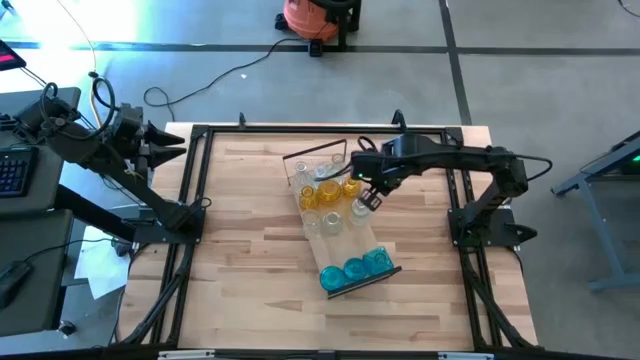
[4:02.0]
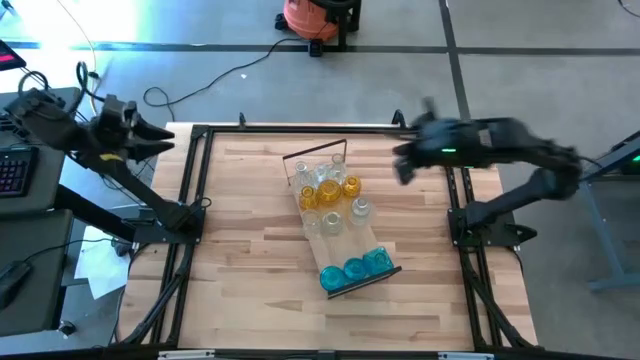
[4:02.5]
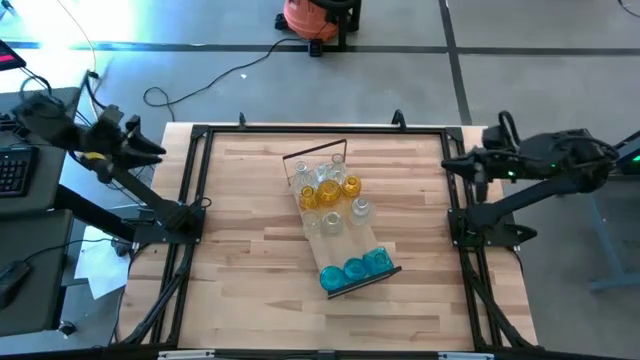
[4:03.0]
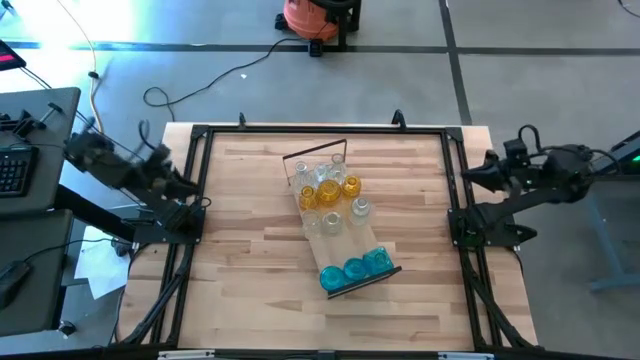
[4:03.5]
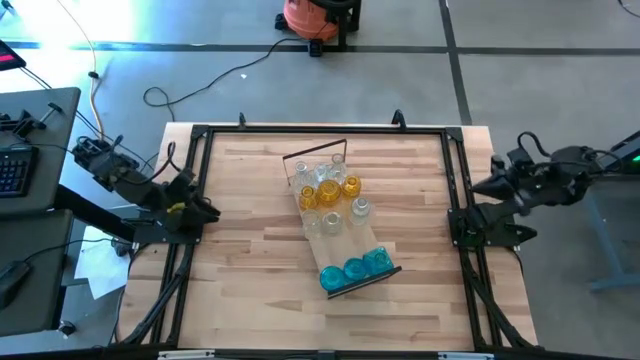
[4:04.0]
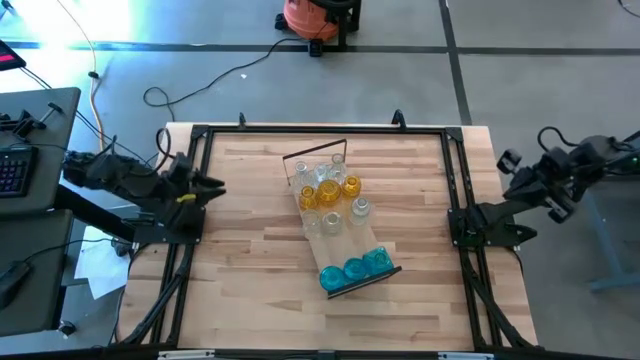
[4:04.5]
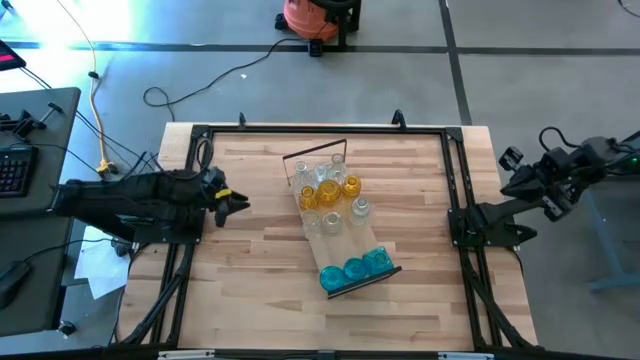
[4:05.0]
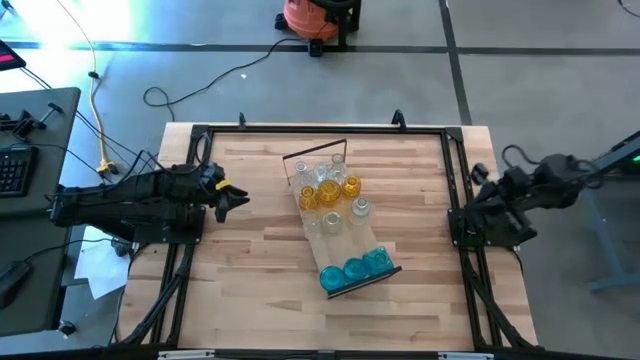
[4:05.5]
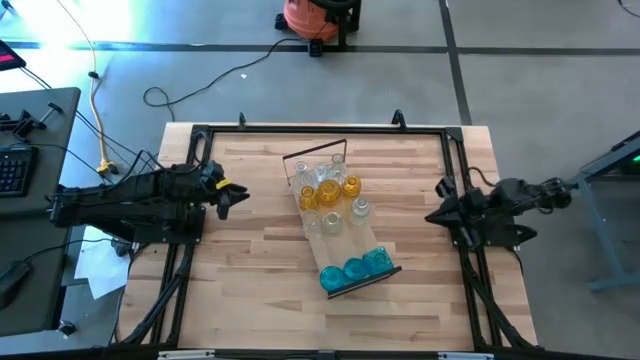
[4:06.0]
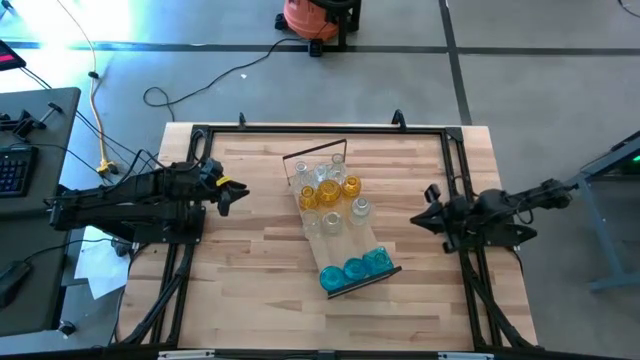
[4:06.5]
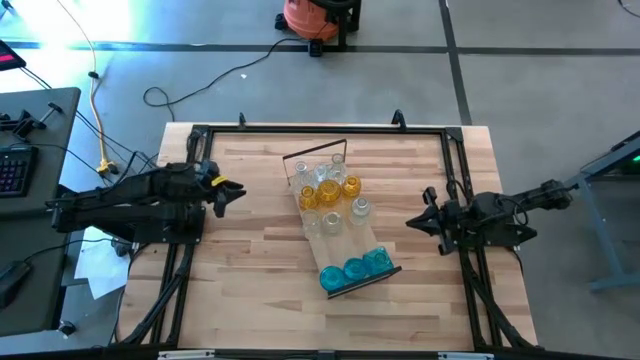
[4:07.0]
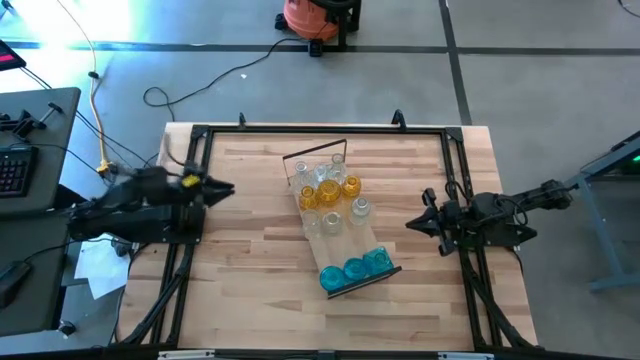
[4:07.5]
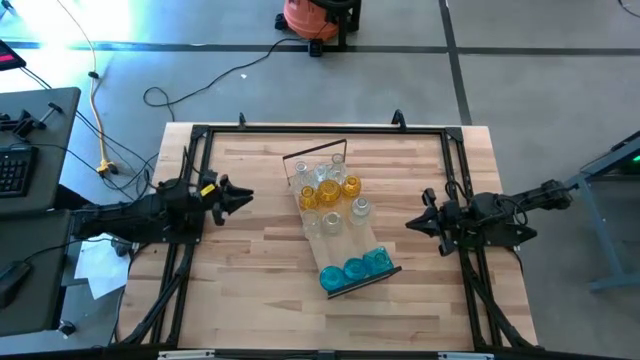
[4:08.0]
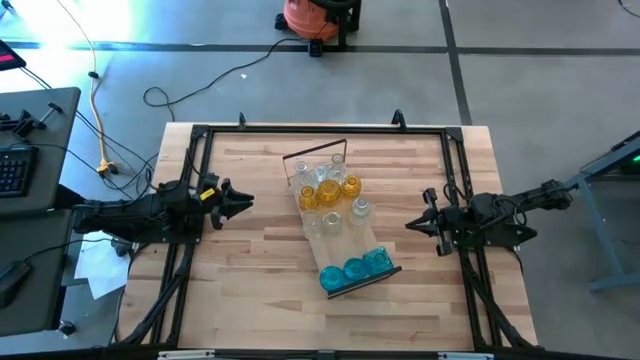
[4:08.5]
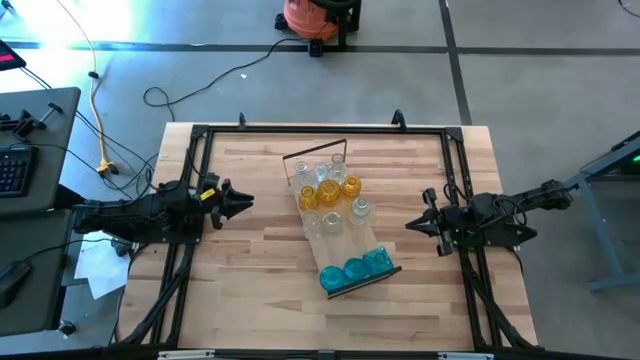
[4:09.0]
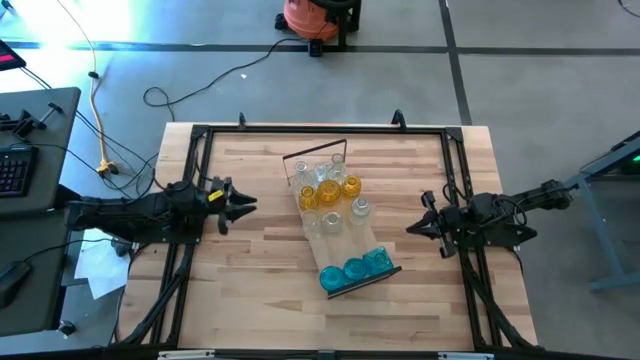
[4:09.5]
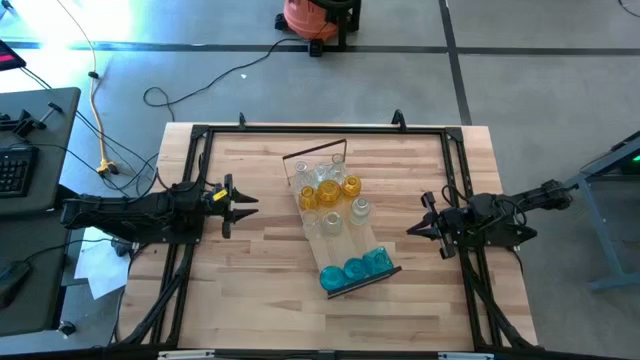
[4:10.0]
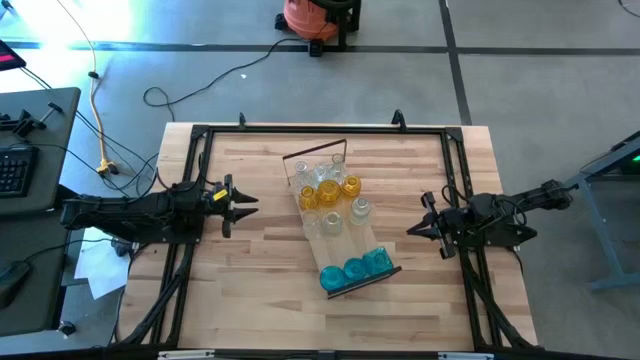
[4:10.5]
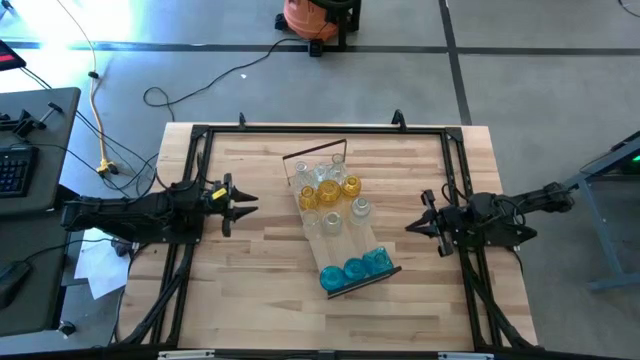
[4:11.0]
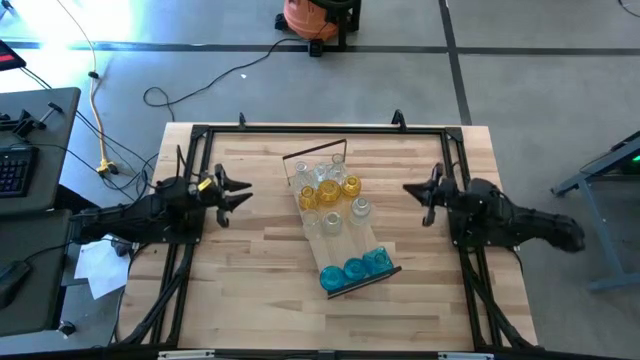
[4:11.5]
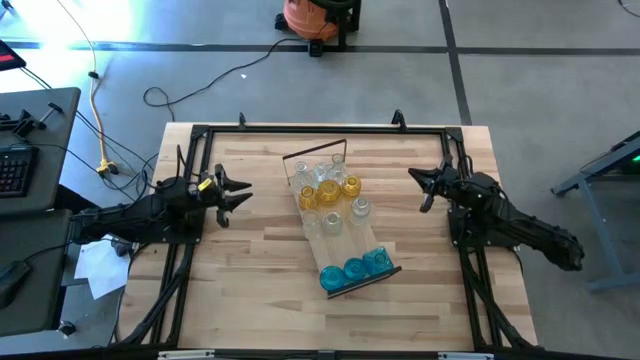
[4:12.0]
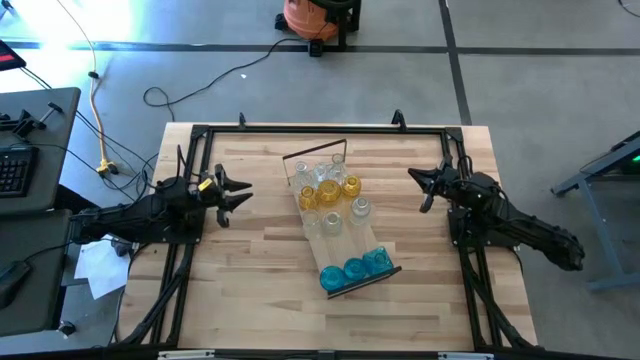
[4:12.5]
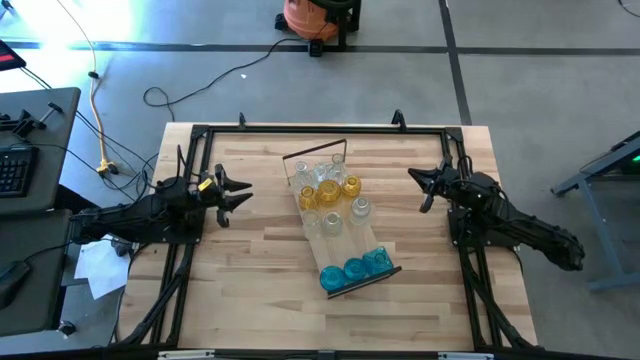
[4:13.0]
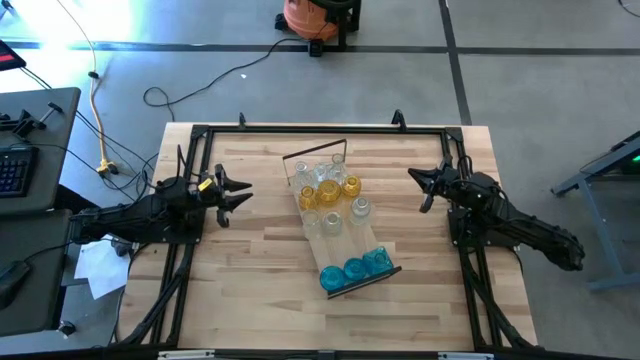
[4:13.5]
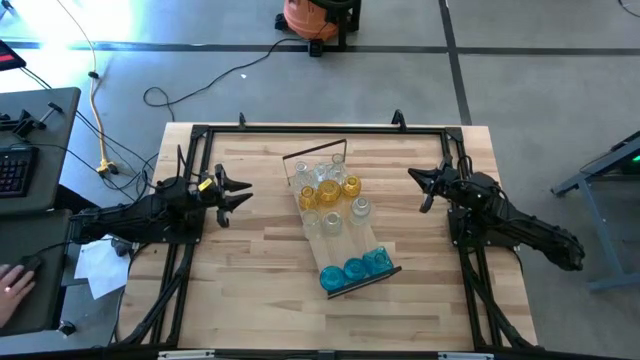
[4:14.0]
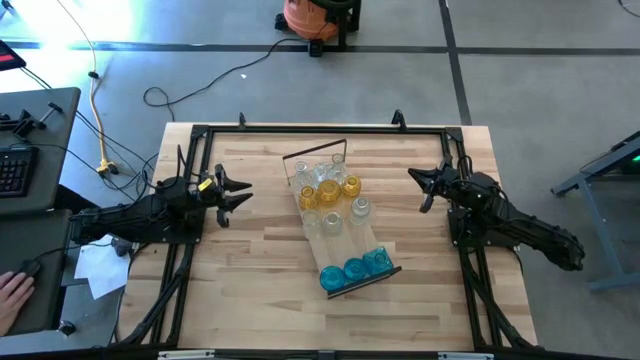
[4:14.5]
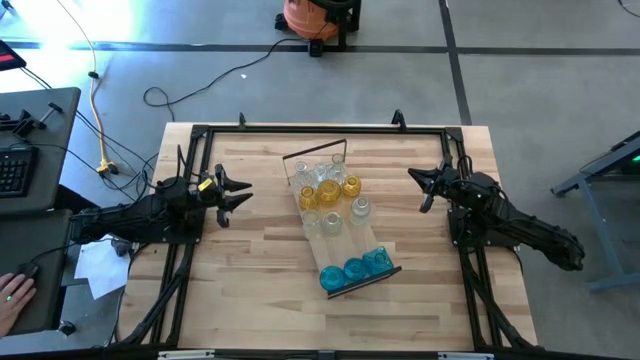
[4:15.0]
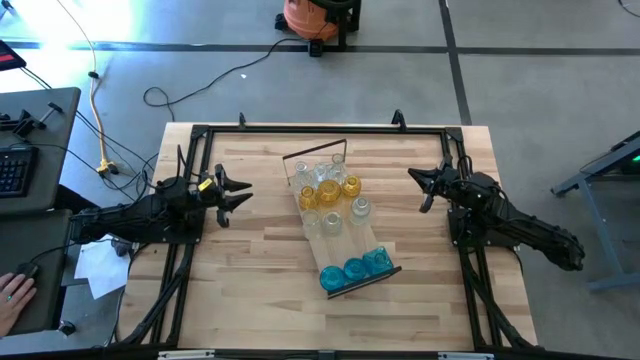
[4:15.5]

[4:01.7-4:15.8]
Task: sort vases onto shelf
Return to Home Position

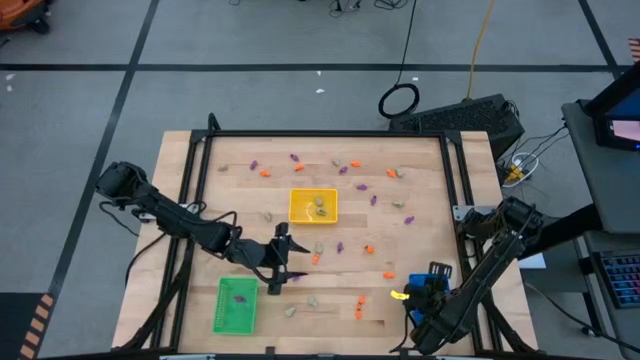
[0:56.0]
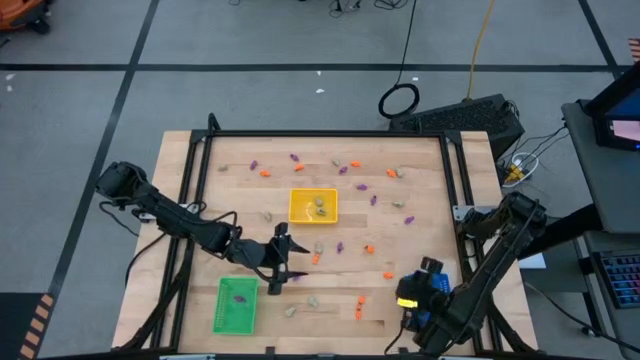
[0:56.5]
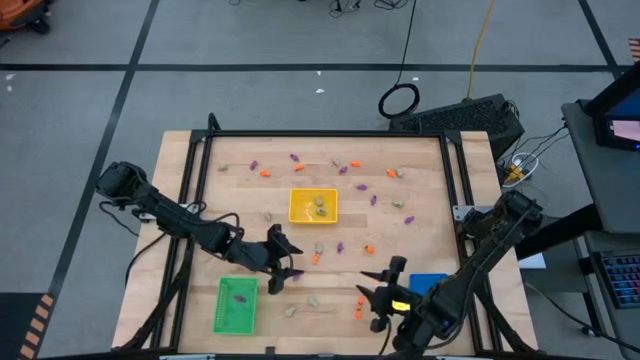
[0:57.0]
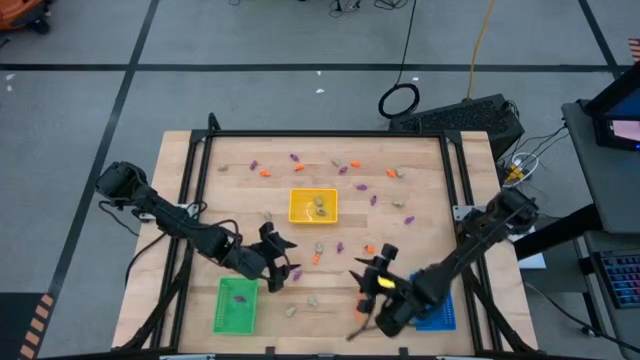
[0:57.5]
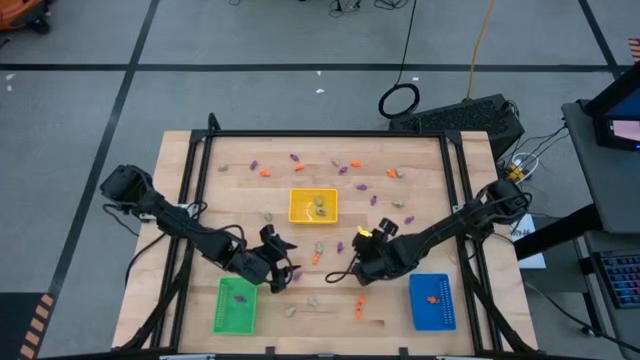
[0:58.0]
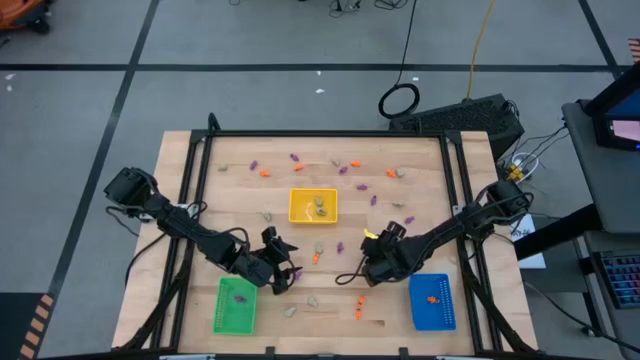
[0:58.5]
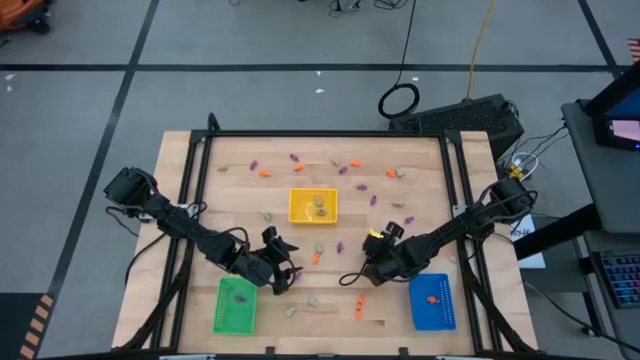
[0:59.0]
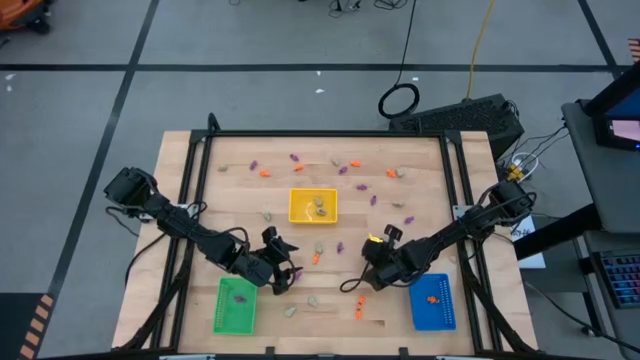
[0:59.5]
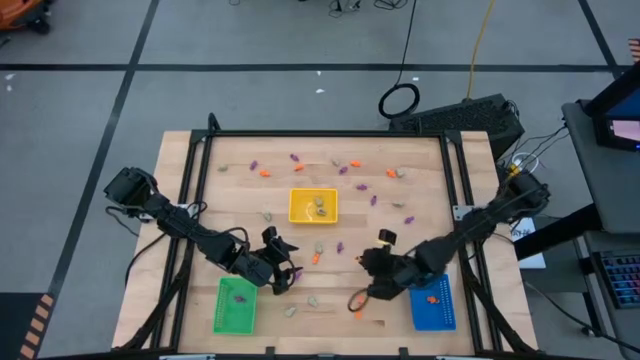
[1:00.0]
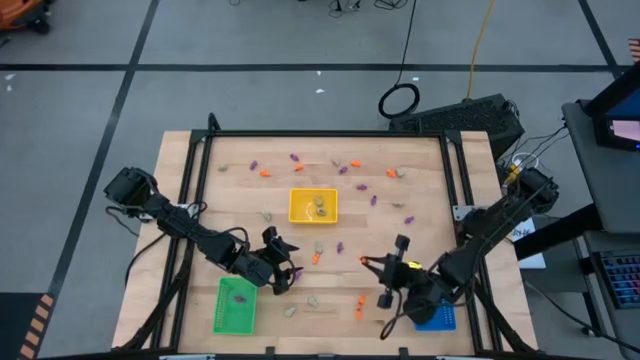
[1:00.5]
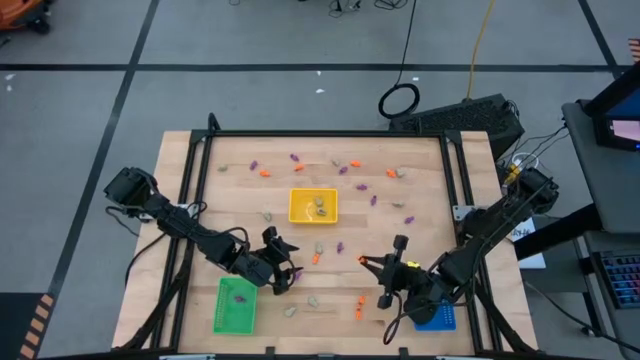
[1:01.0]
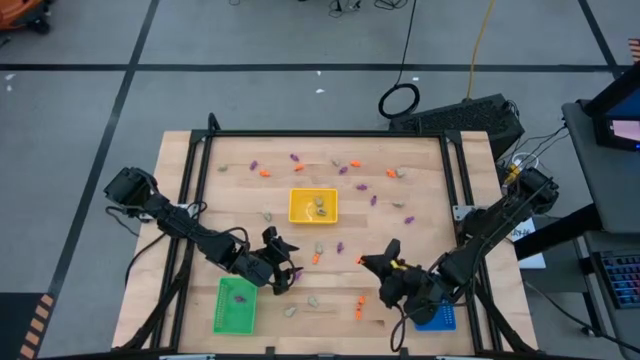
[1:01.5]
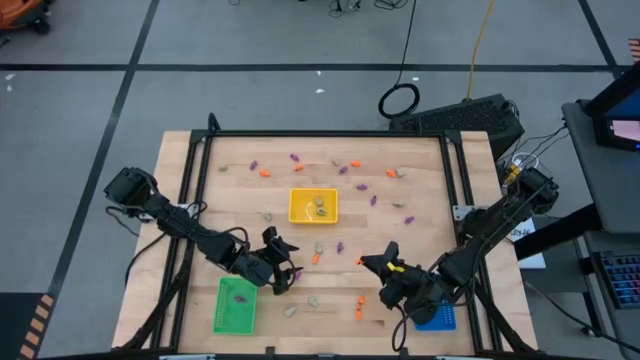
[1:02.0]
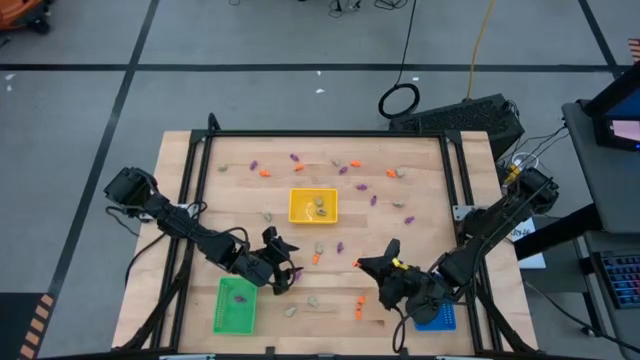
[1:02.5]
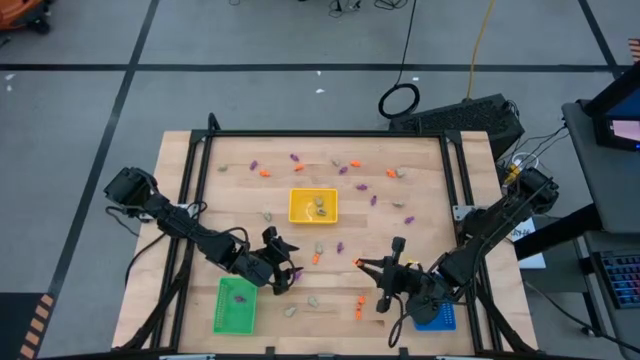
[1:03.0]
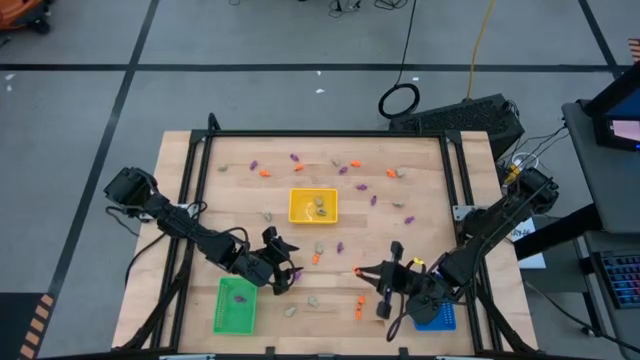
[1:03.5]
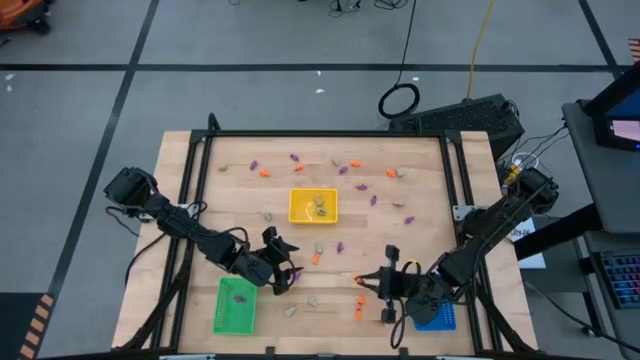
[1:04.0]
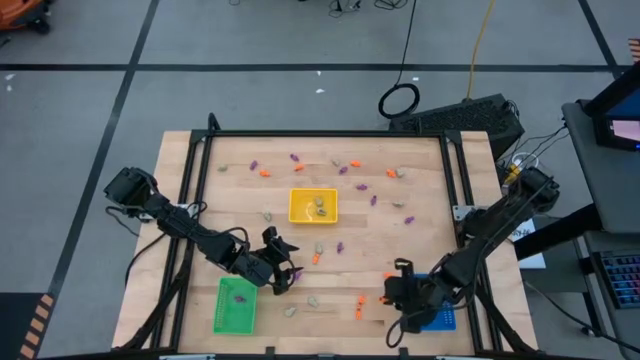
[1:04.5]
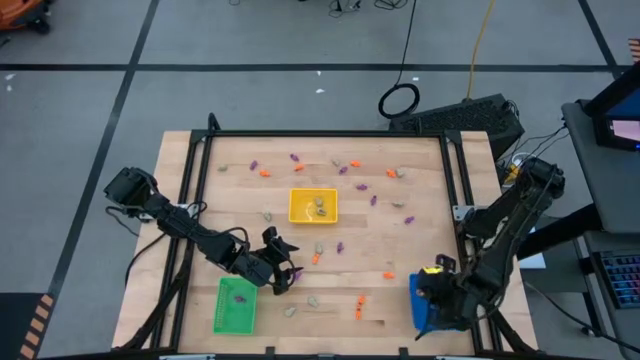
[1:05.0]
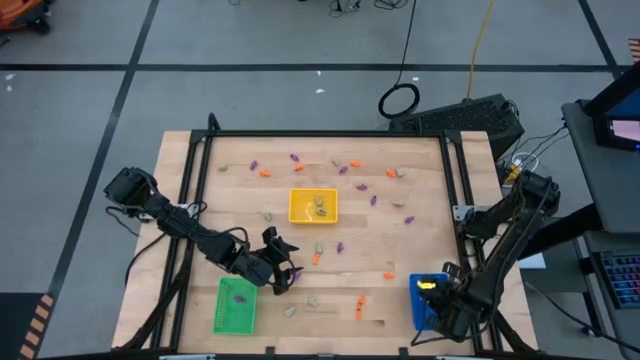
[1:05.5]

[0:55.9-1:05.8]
Task: Sort Halloween decoration
Put the orange skeleton toy in the blue basket
